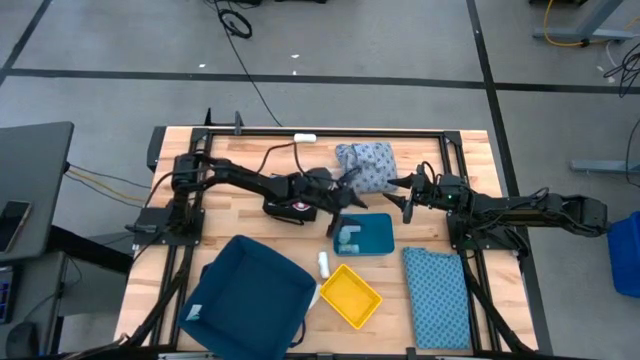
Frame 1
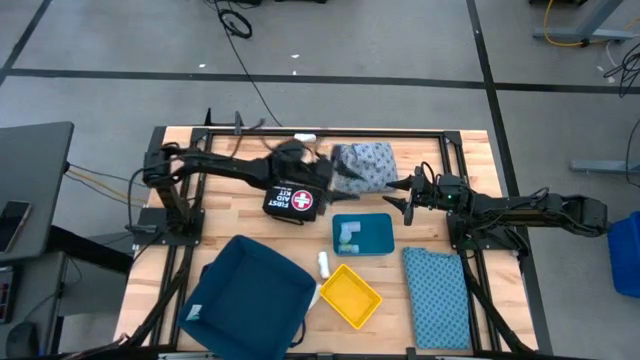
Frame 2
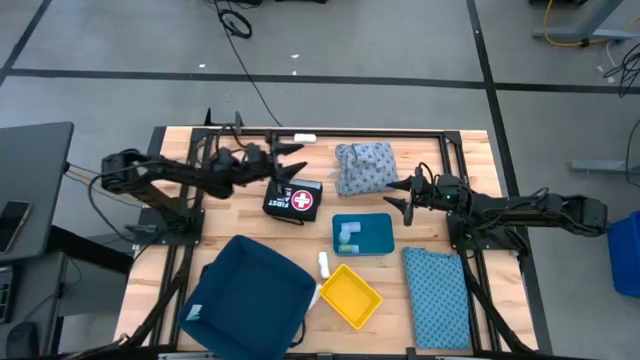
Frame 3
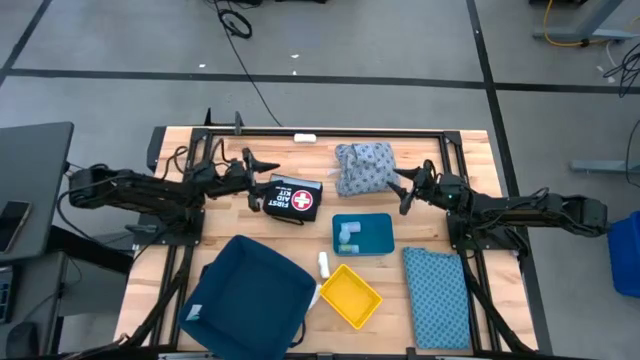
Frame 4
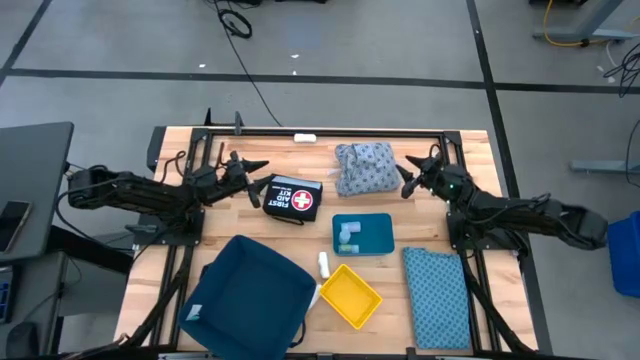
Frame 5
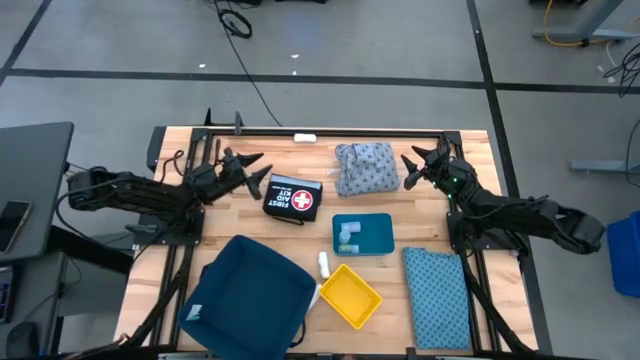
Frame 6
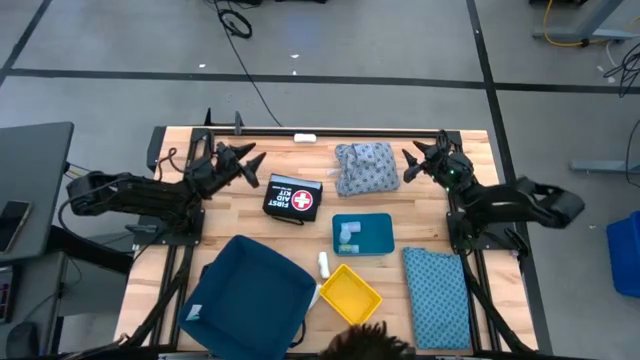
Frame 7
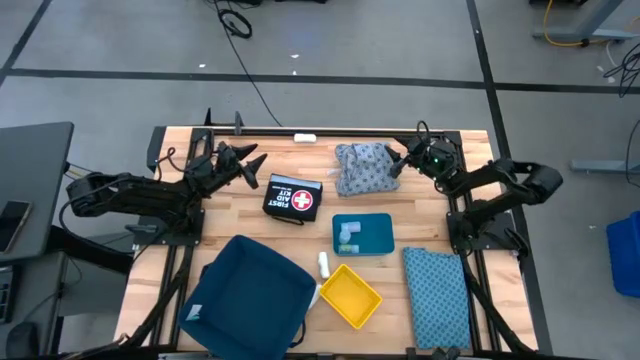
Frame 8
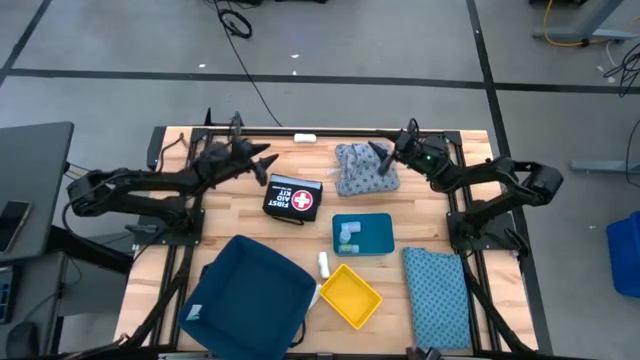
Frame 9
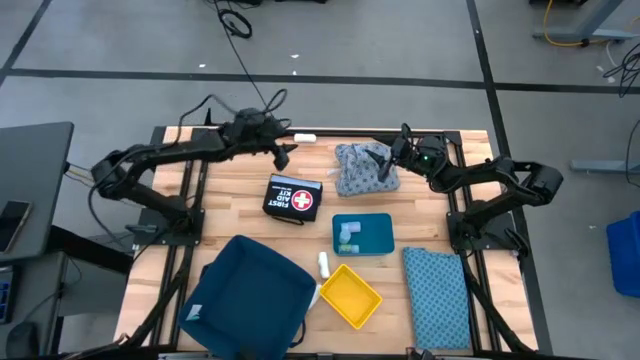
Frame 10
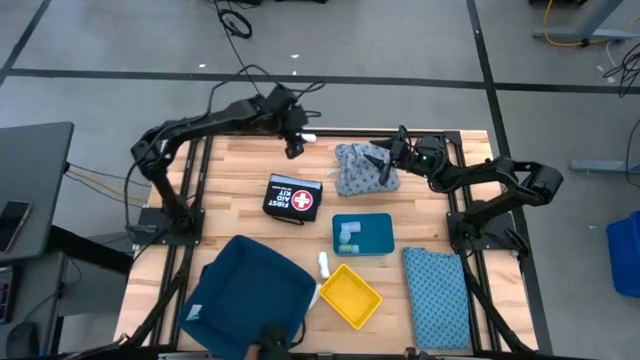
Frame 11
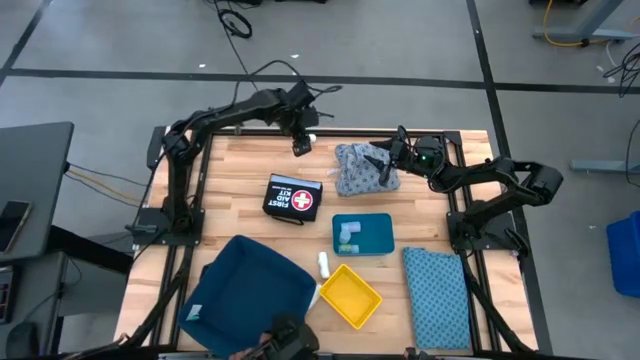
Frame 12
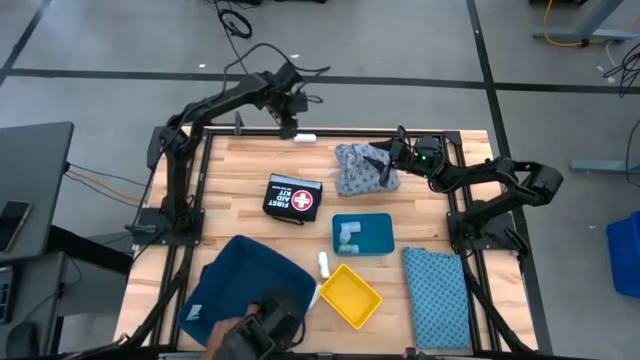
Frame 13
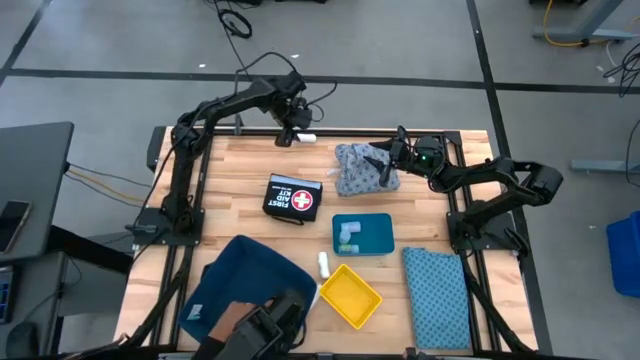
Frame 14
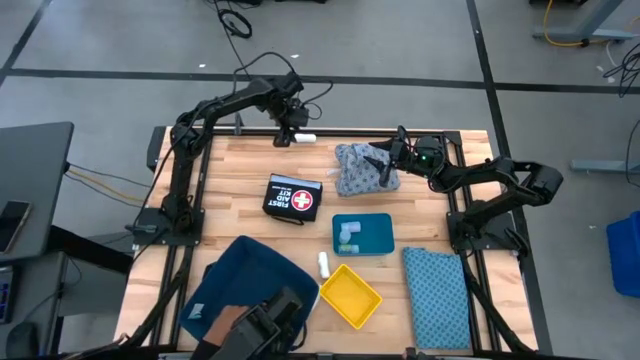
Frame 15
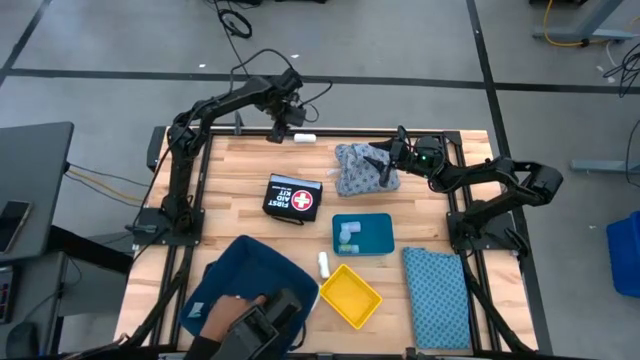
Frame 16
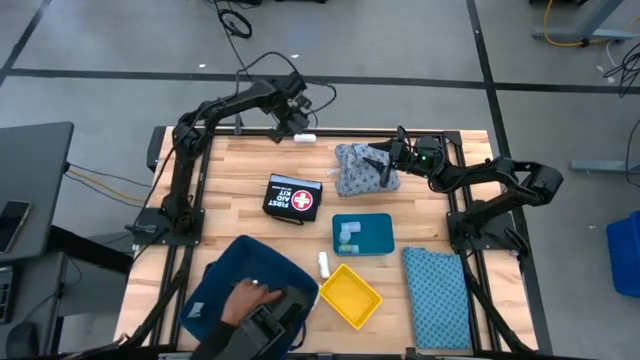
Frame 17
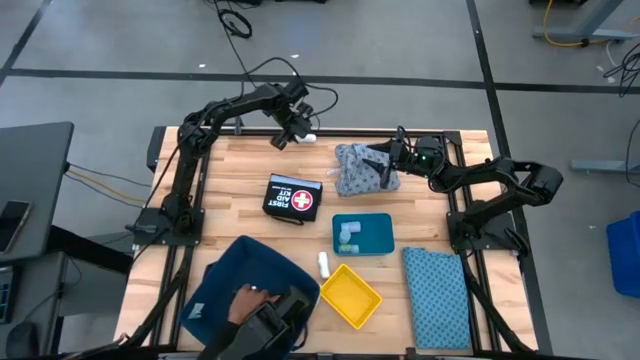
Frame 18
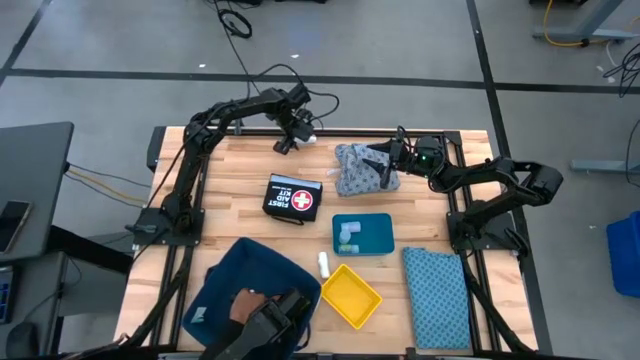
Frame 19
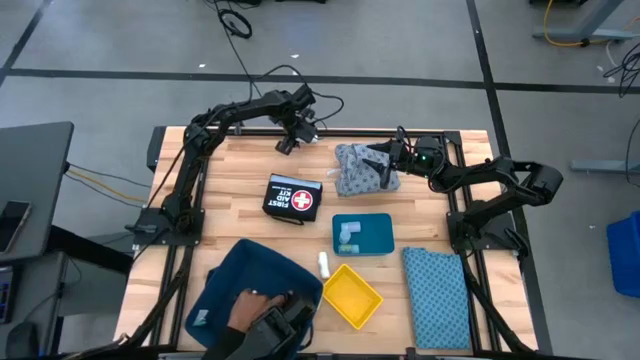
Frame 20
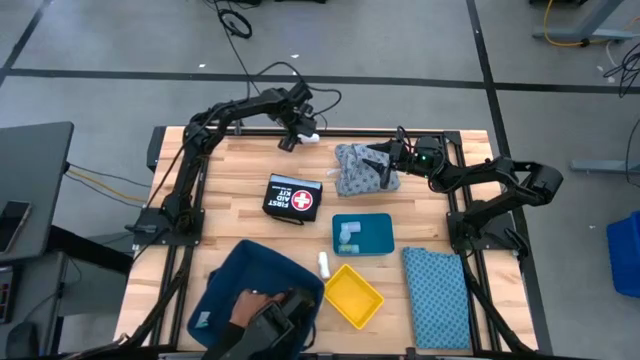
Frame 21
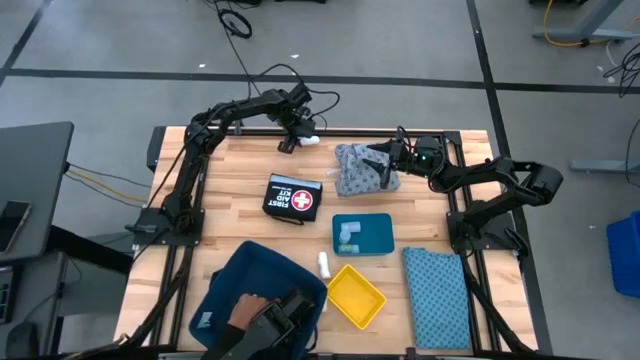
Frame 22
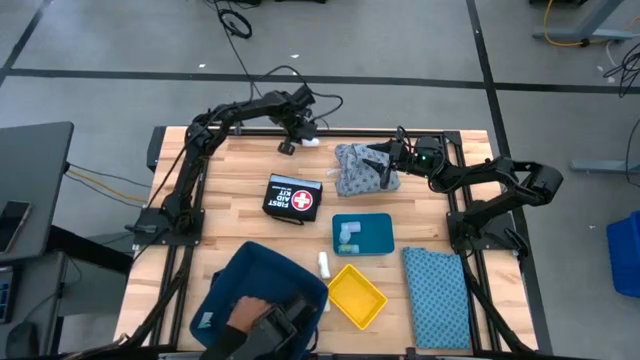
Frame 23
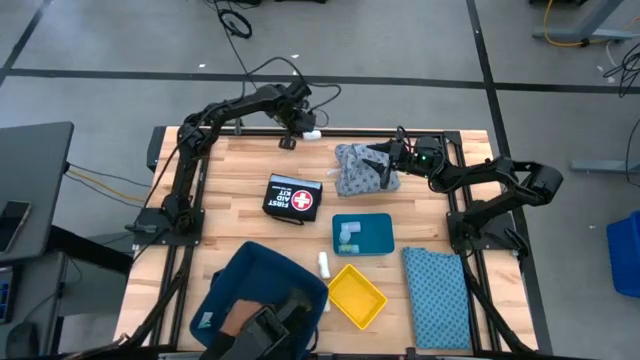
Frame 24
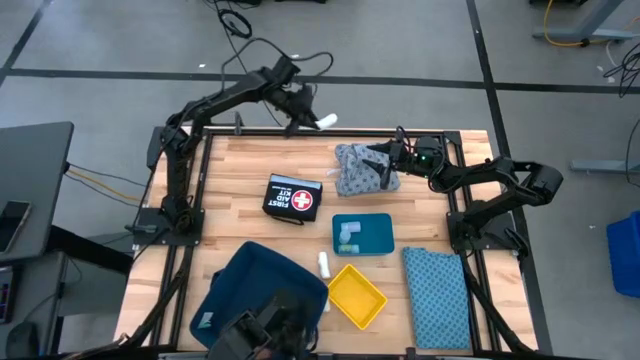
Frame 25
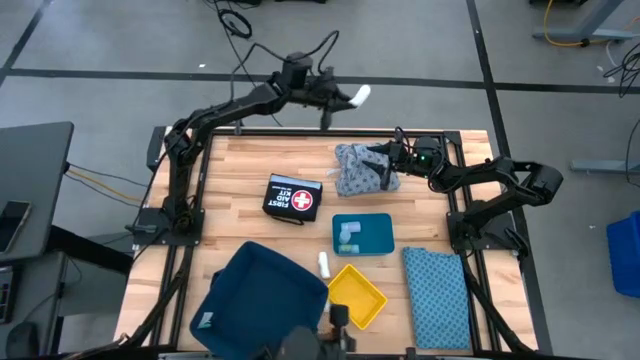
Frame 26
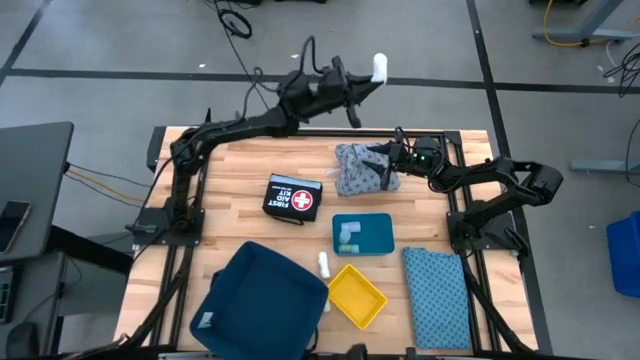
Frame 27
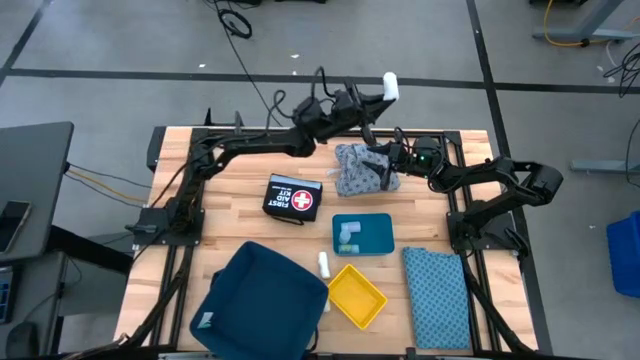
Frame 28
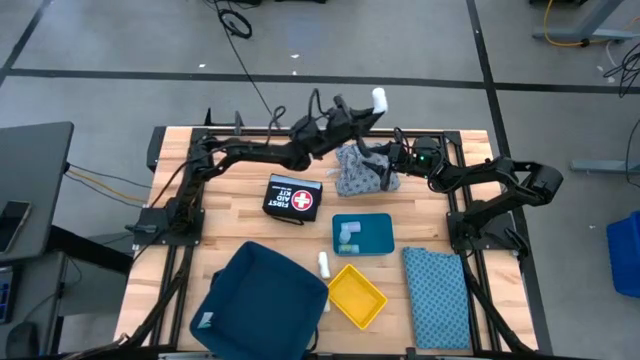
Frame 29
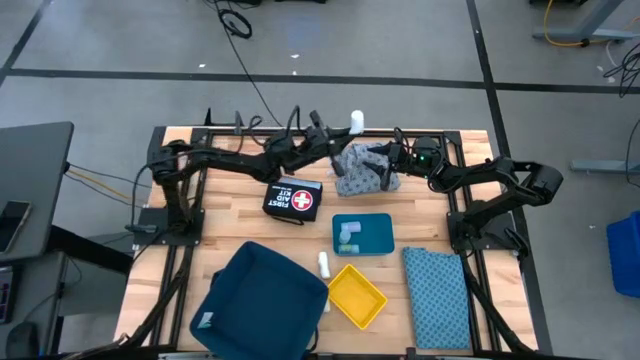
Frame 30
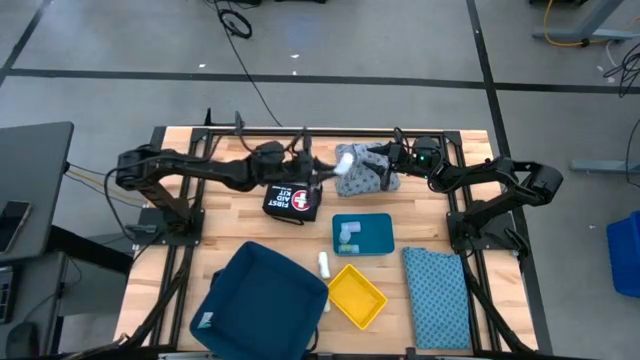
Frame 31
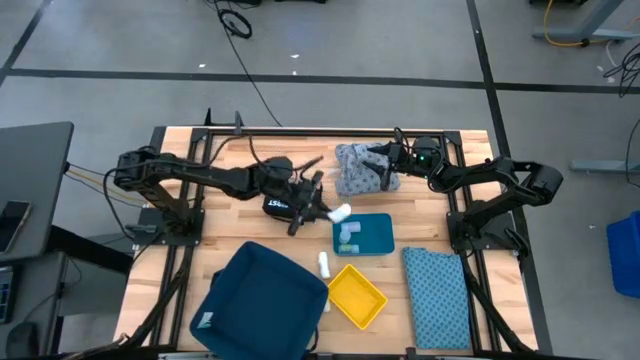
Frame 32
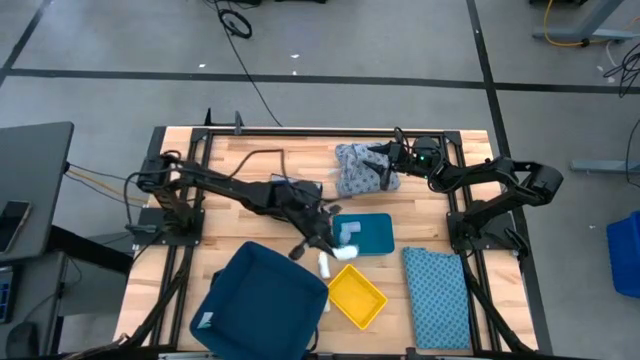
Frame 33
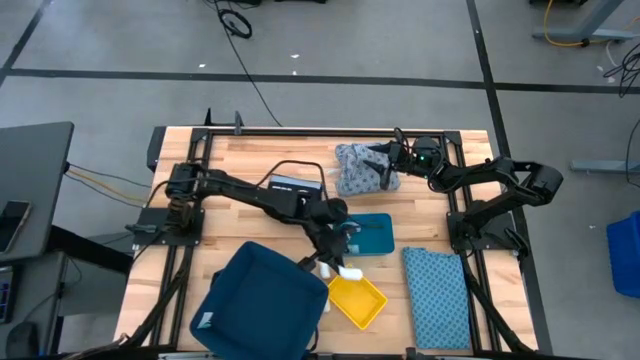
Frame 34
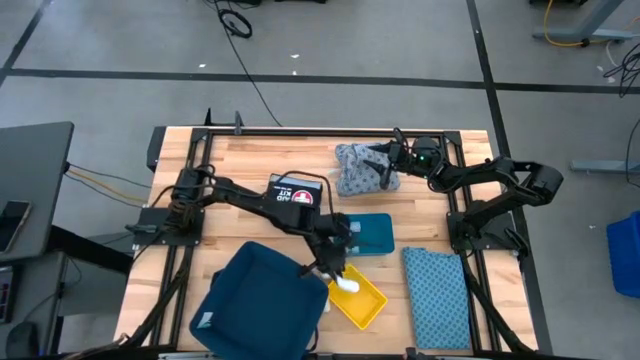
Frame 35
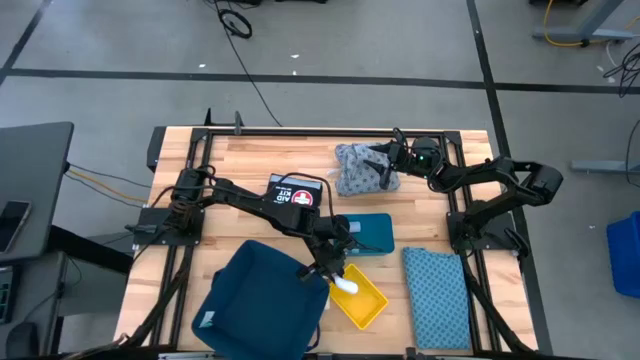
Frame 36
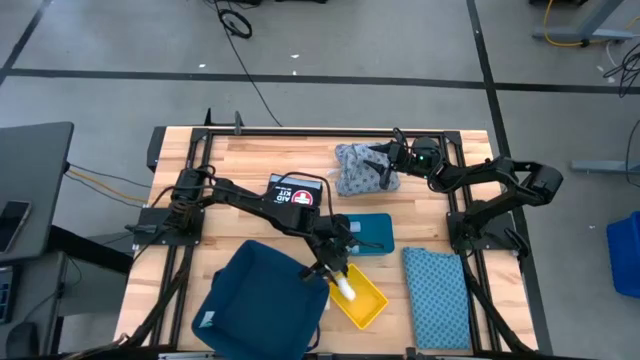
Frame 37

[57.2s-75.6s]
Task: Pick & place medical supplies in basket/bin
Put the top white gauze into the yellow bin

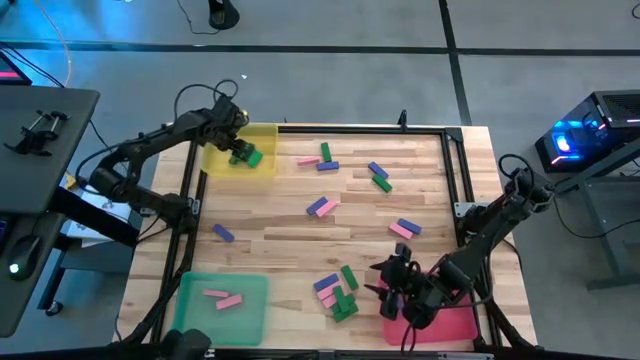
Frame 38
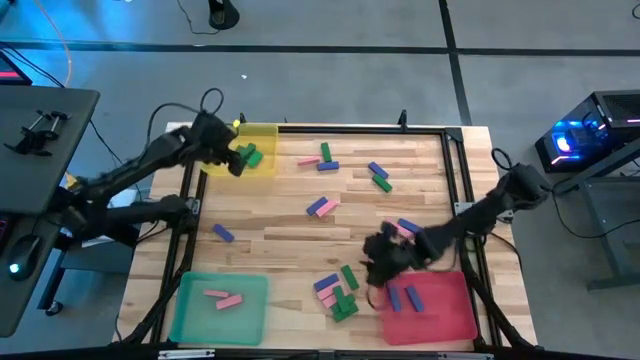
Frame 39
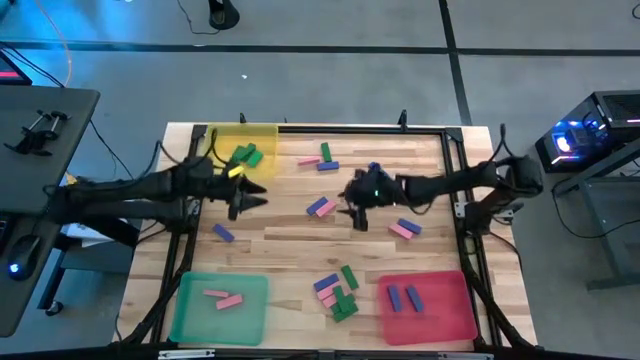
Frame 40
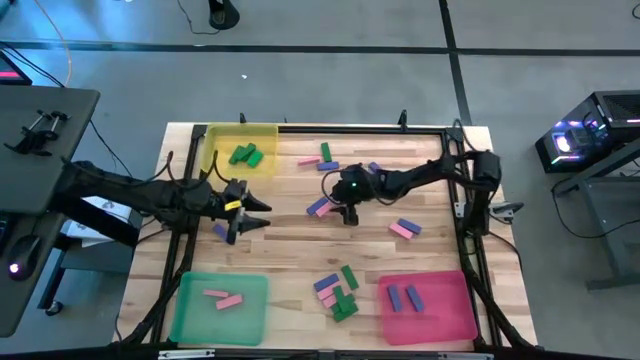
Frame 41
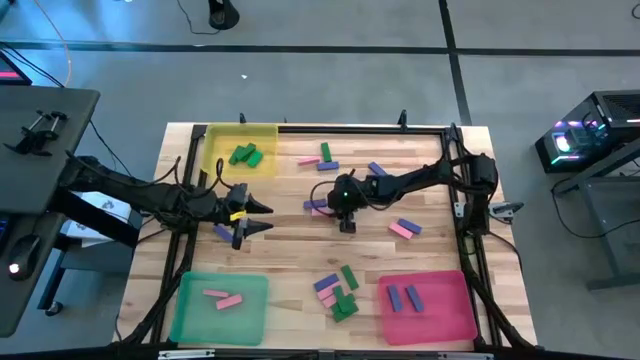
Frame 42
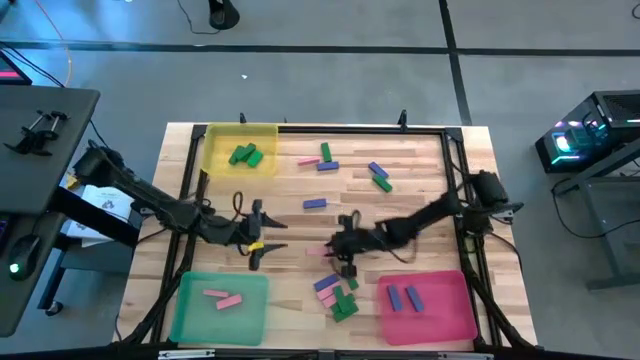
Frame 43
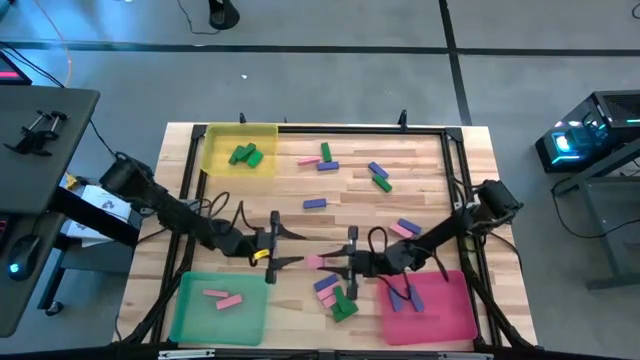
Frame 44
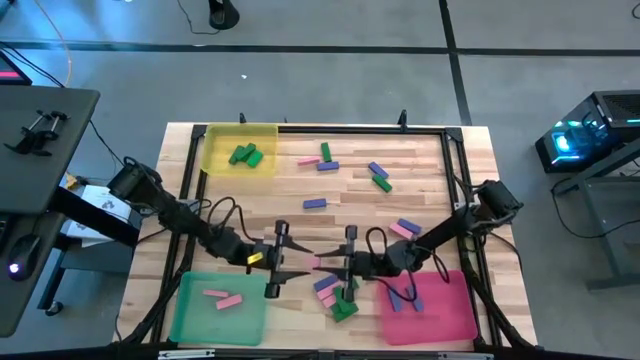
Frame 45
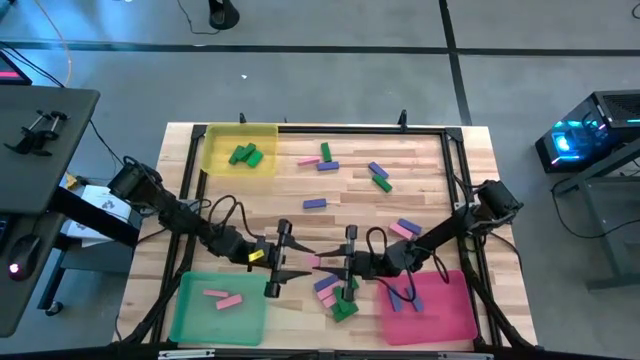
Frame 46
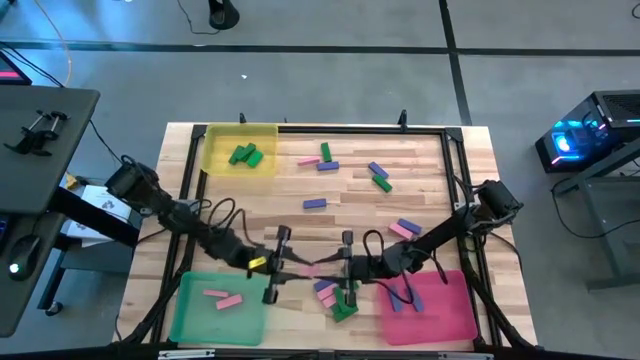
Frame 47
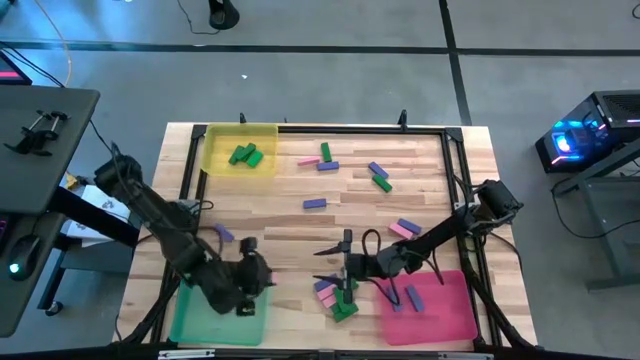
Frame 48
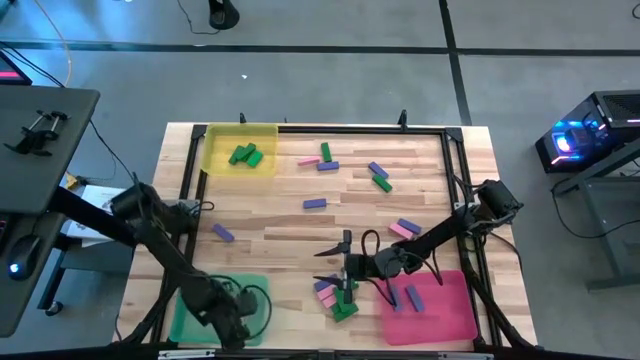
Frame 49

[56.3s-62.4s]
Task: Sort blocks
Put the pink block into the green bin
